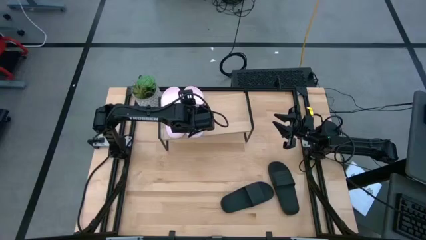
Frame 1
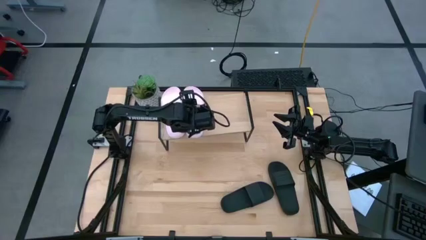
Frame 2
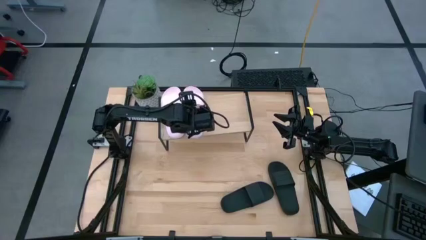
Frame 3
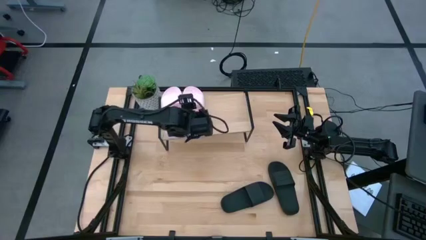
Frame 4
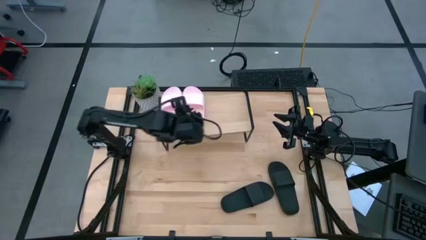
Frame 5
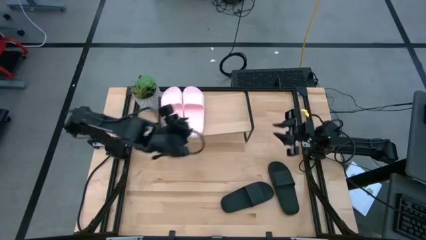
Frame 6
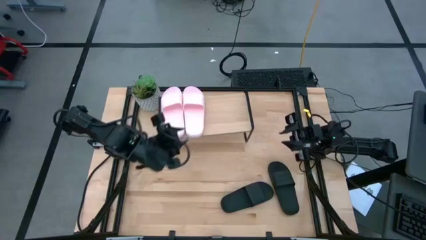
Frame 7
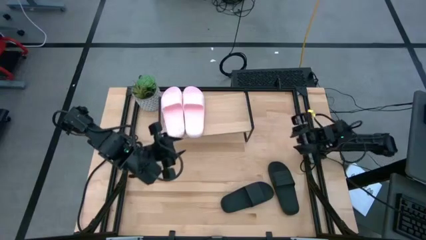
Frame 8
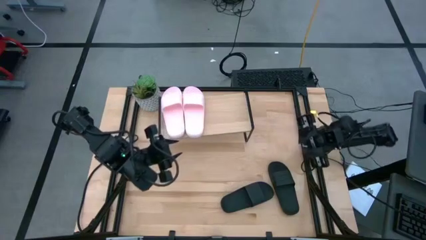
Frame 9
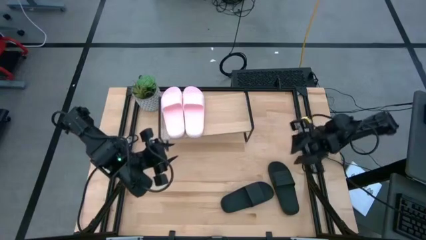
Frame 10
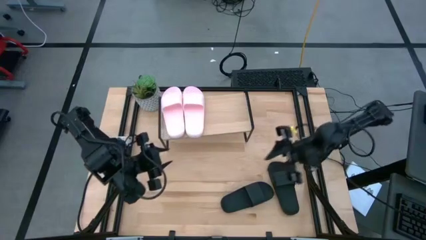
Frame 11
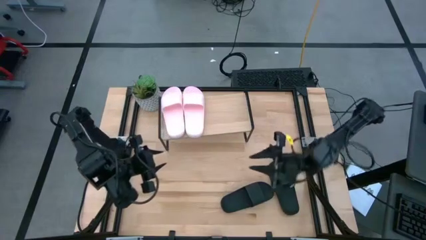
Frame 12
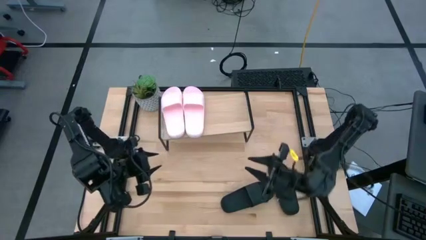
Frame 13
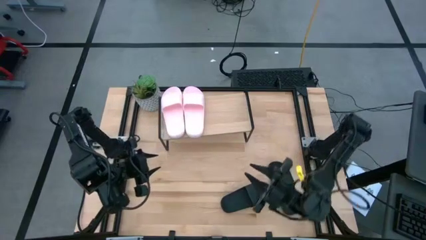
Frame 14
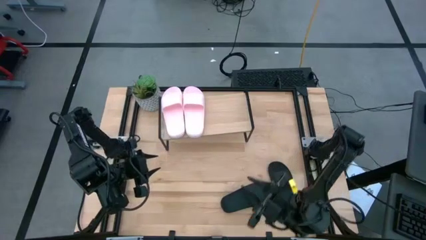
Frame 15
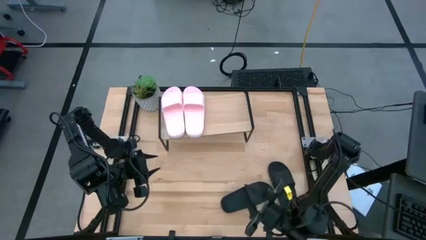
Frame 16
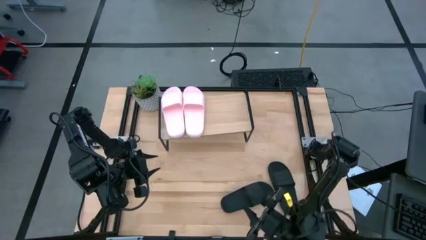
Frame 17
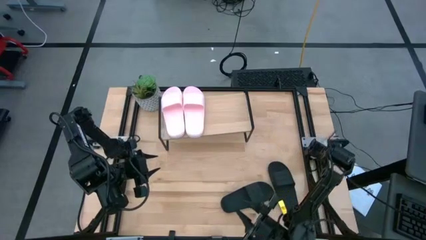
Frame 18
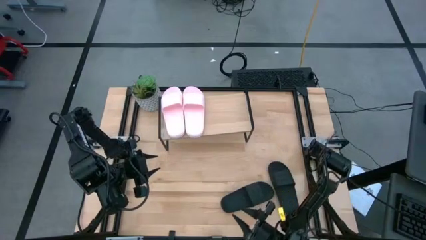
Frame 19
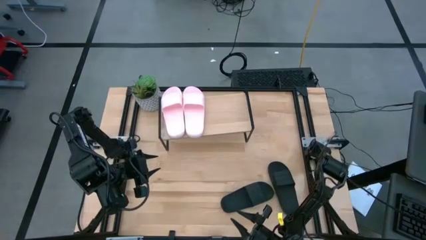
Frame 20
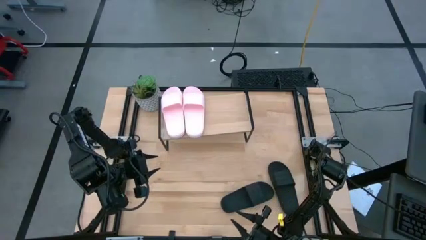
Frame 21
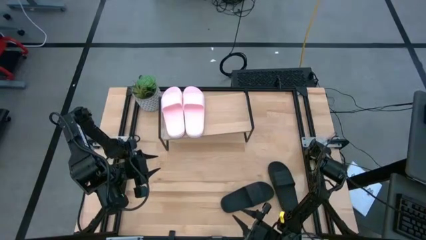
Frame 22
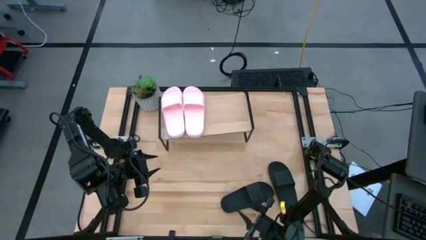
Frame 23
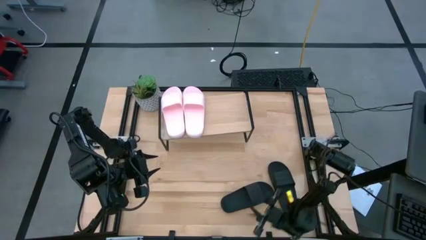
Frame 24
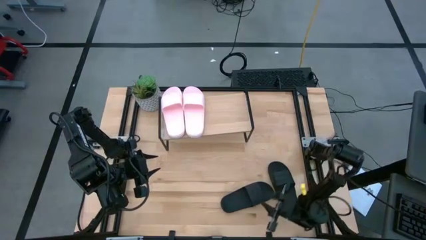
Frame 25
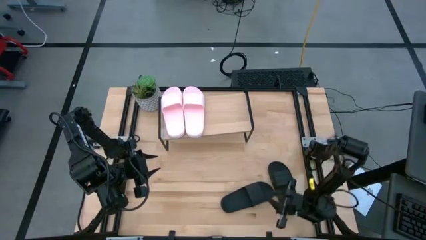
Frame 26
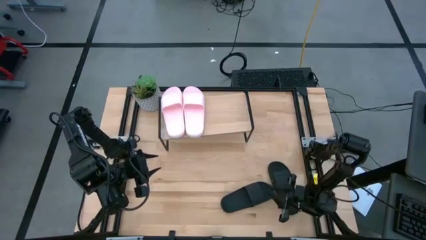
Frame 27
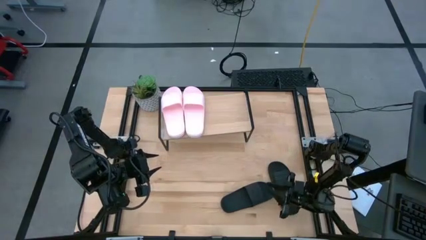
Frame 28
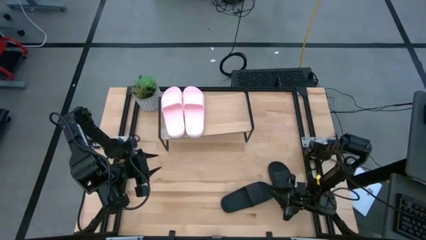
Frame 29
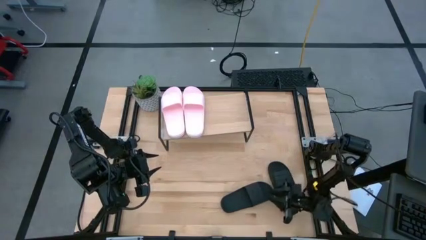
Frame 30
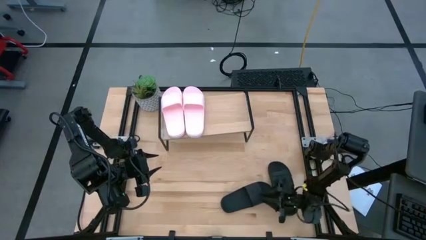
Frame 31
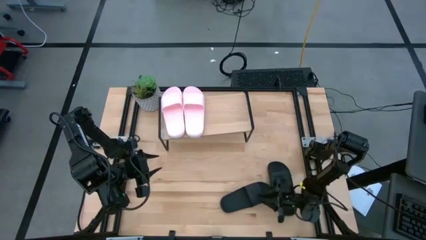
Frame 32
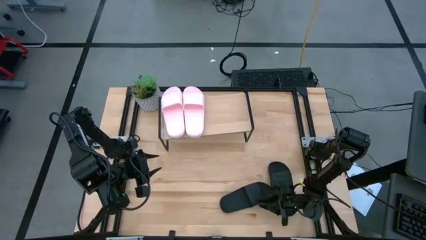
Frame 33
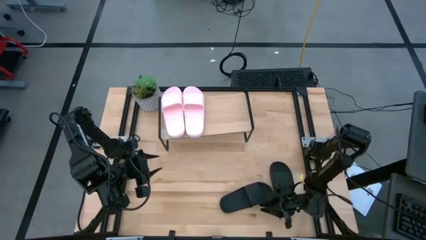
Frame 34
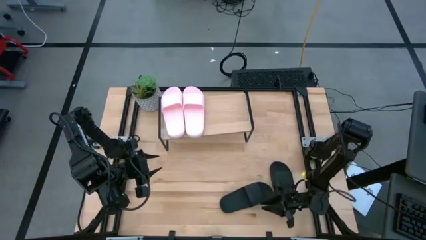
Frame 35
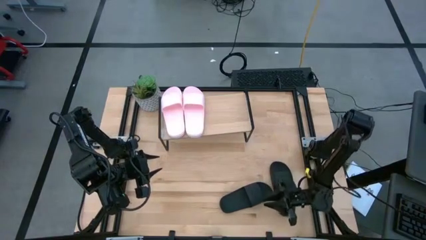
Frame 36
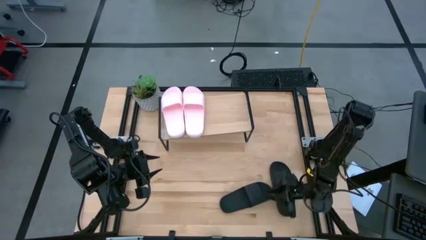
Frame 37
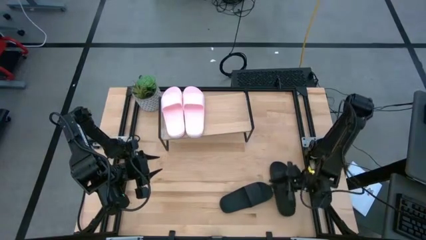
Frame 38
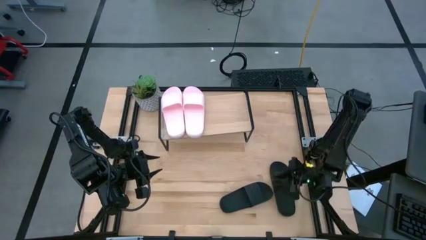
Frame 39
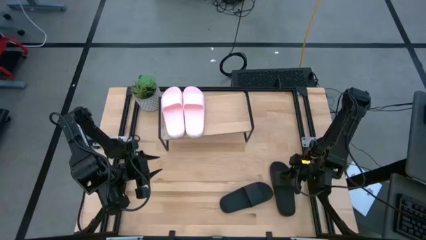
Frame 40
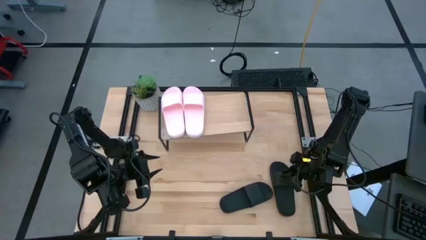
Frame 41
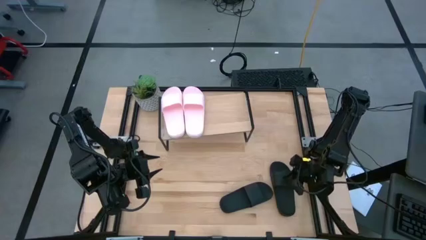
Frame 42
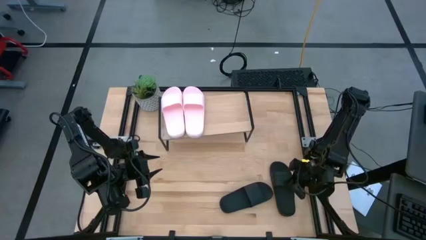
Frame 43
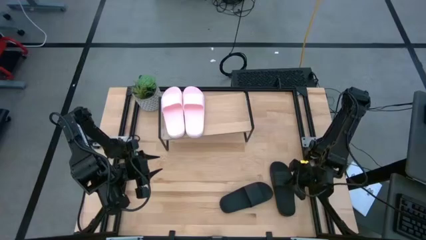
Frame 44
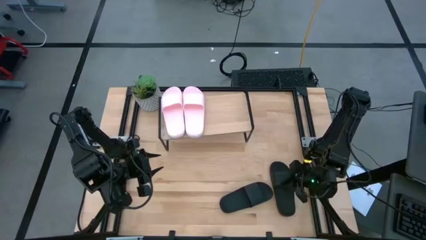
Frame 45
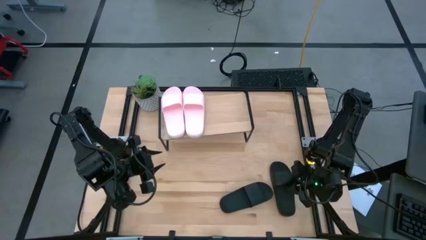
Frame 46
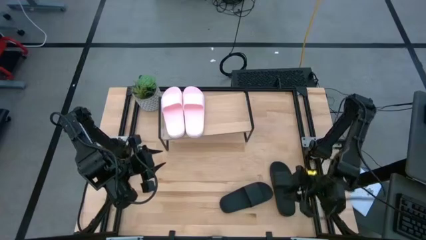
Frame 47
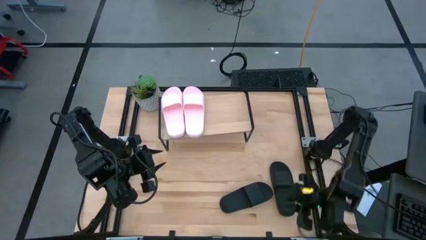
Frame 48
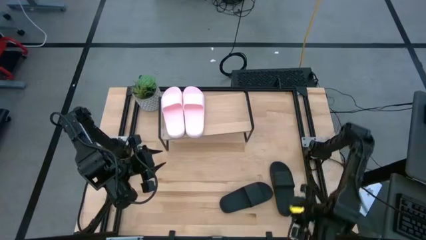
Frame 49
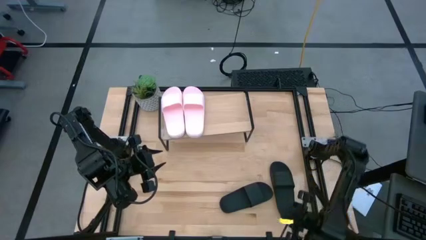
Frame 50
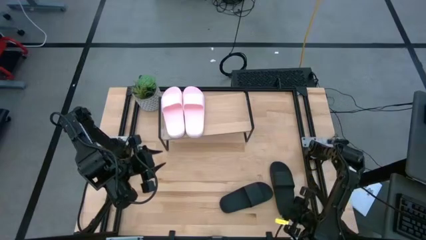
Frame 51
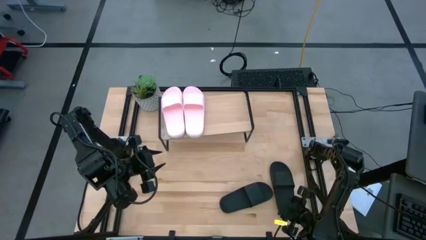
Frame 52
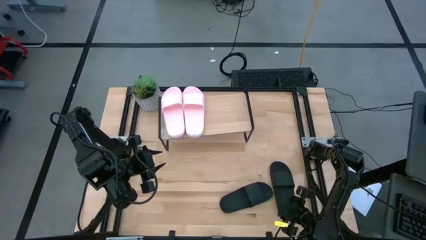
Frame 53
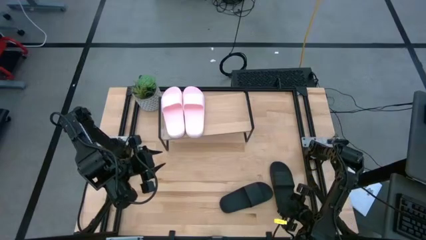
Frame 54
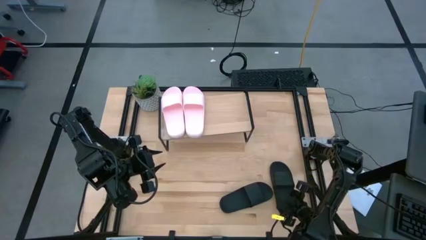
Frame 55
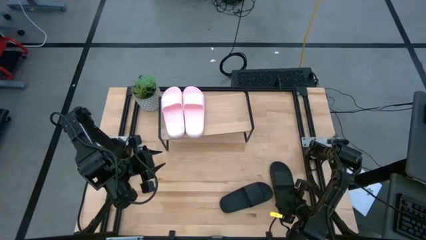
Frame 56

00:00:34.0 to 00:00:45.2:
Task: Pick and place slides into the shelf
Put the right black slipper on the shelf
